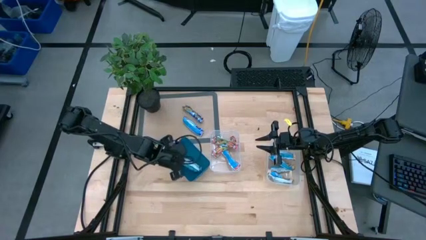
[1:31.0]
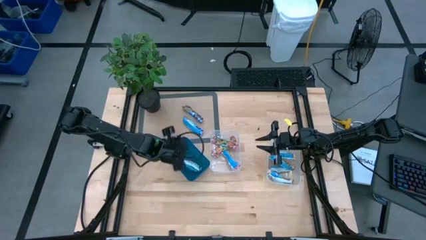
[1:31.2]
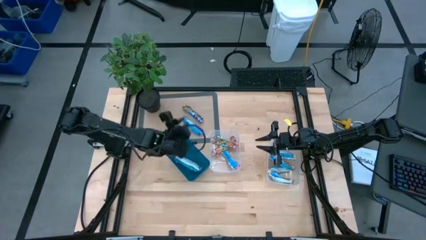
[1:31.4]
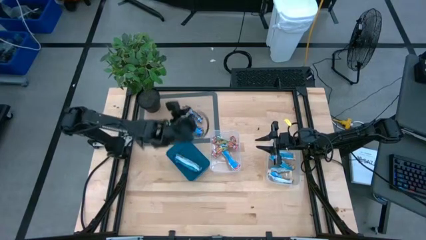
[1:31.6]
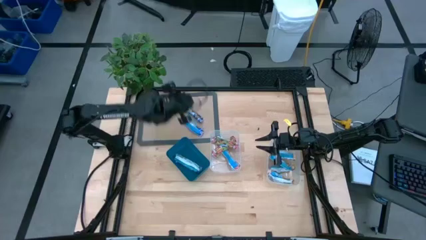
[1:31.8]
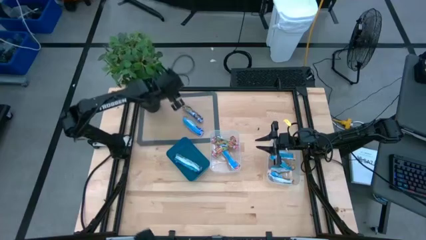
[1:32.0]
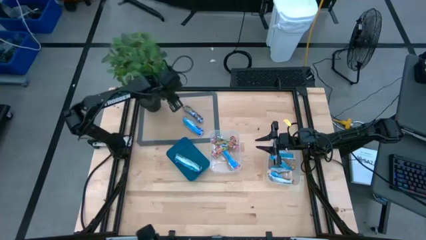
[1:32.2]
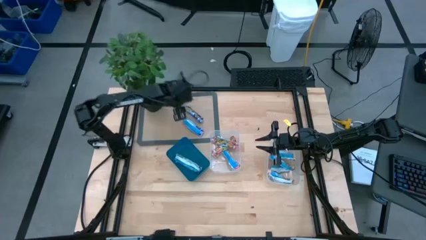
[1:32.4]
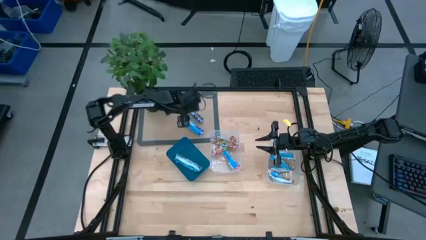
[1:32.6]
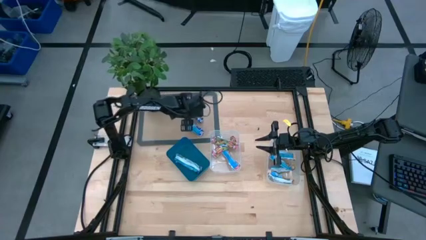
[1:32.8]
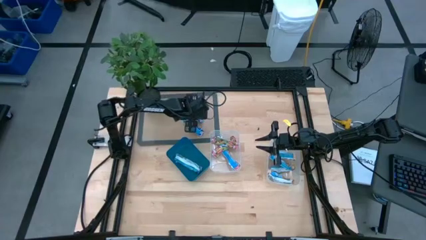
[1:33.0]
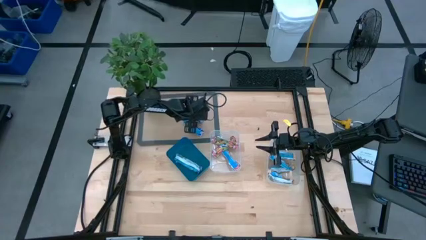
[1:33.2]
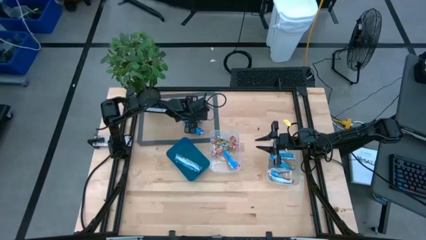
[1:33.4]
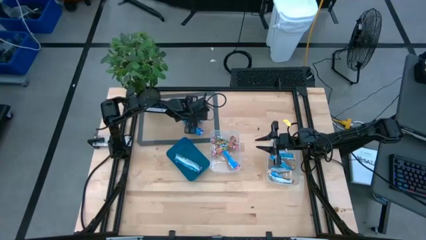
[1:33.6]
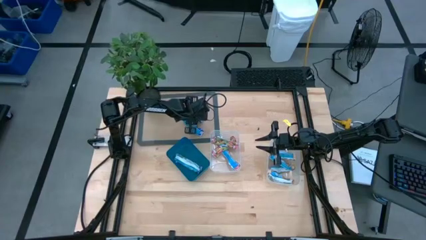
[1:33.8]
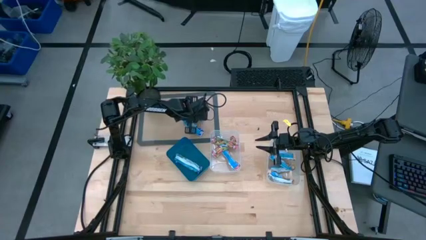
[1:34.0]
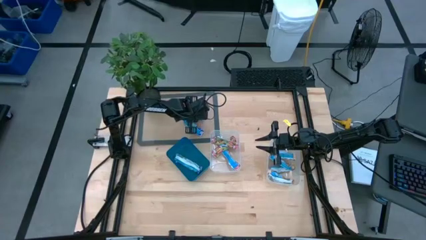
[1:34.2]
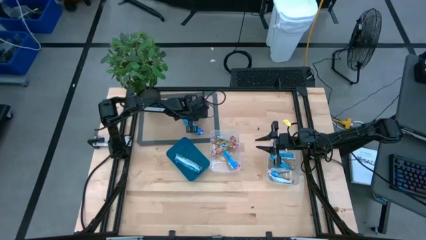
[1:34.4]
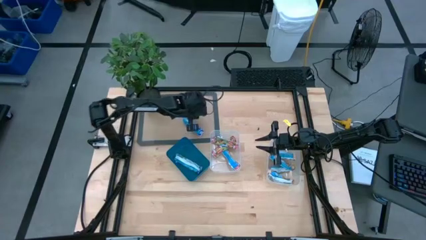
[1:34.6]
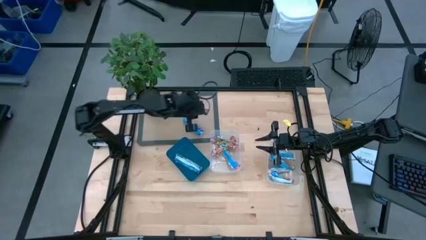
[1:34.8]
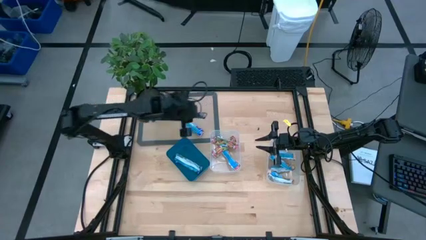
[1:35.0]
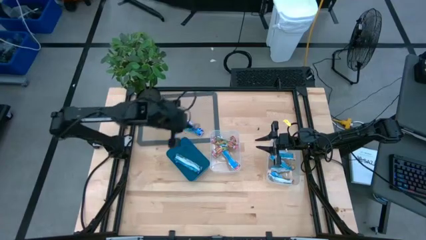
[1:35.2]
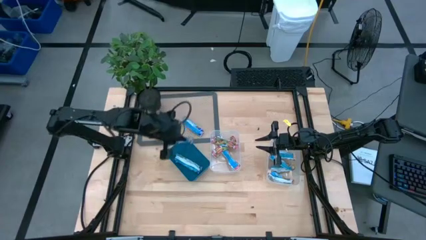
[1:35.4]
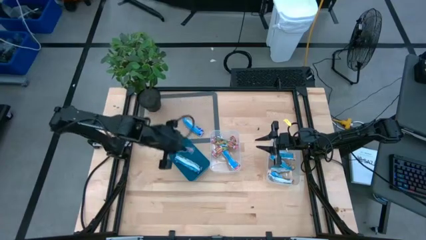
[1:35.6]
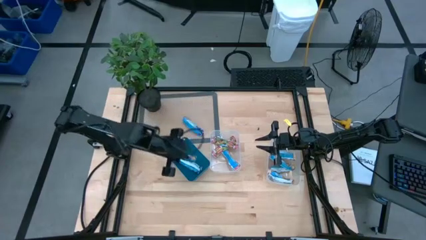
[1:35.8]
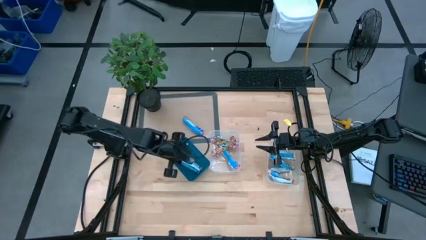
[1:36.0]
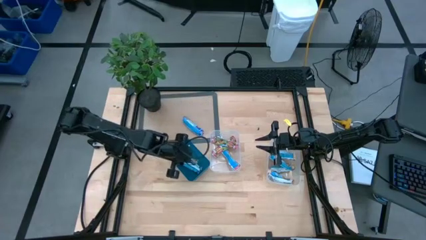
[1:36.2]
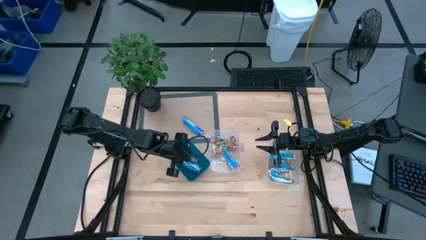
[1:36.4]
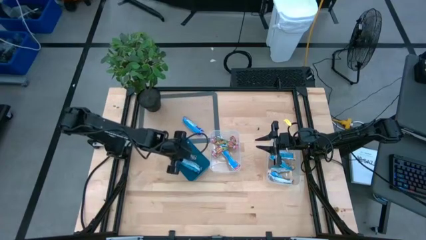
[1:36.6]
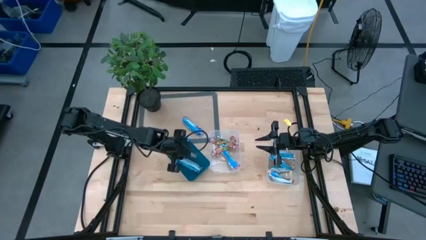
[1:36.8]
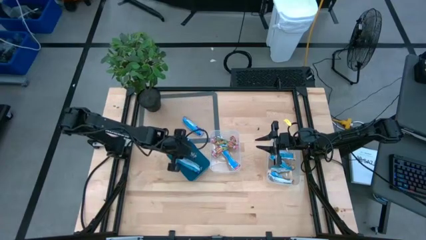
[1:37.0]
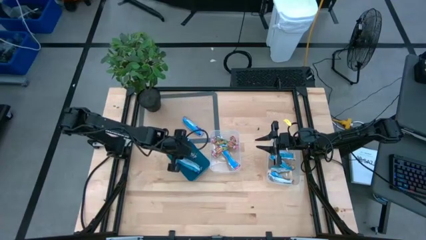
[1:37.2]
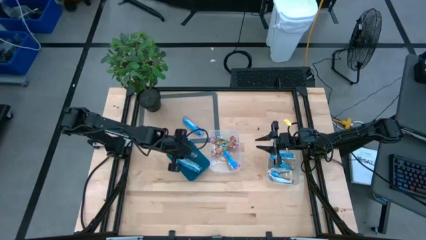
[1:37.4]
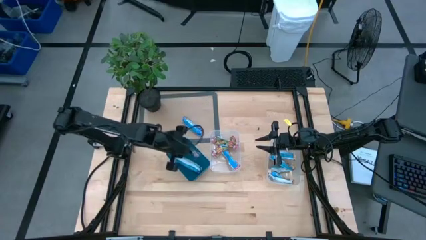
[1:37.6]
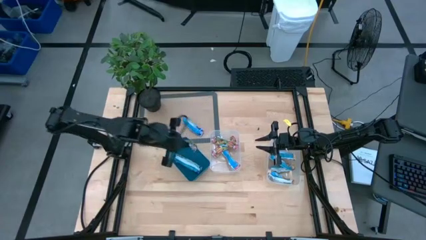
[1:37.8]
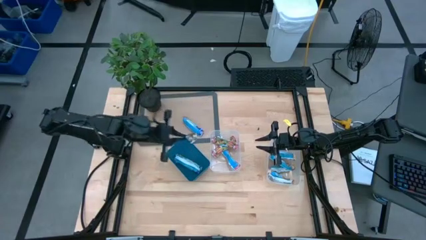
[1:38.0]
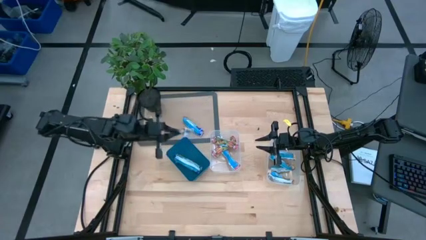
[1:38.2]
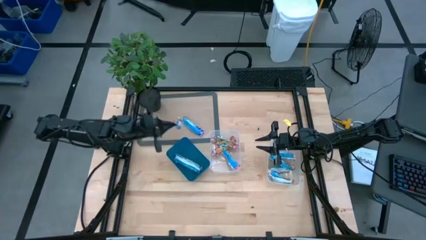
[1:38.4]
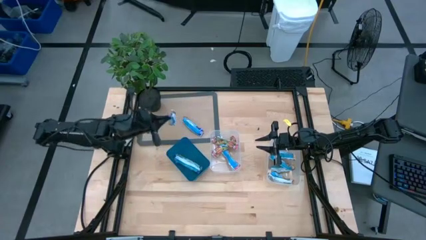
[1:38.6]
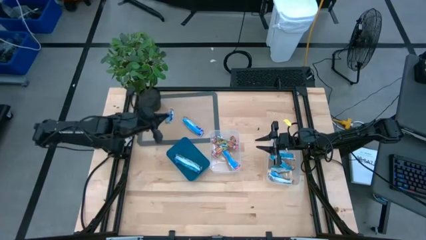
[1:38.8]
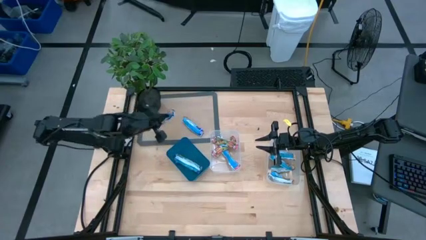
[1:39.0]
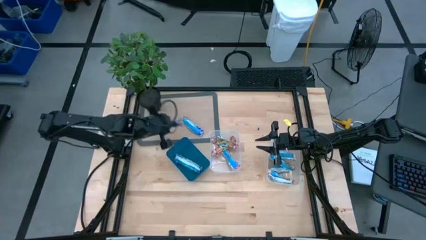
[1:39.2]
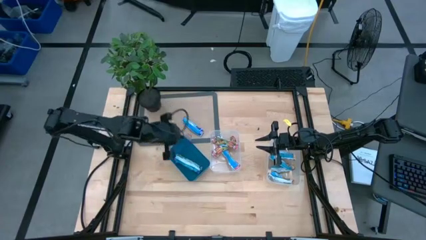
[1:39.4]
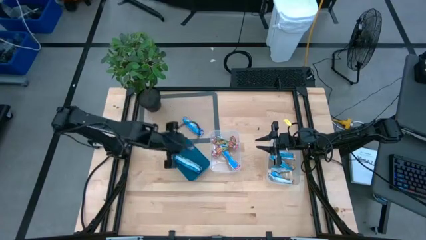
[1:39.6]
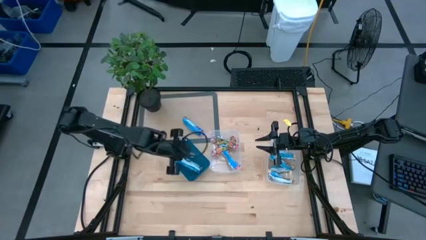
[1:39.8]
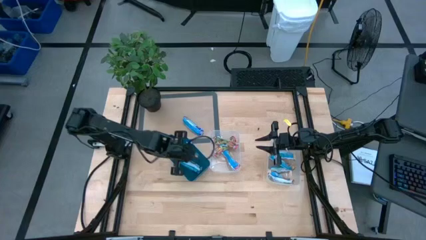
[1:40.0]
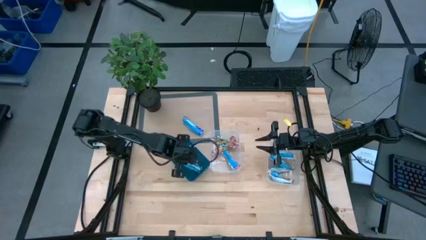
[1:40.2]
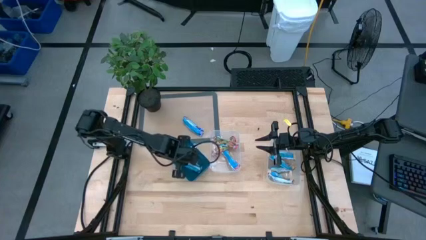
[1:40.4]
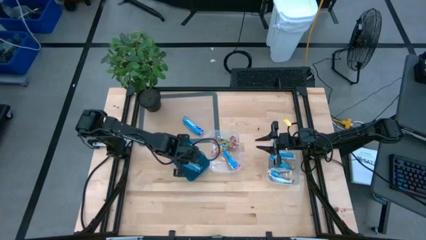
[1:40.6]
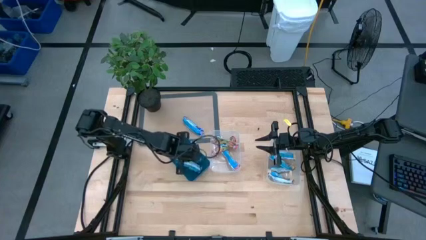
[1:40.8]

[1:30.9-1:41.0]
Task: Pick and place Granola Bars by type
Put the blue granola bar into the blue bin

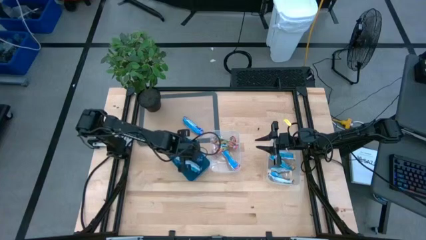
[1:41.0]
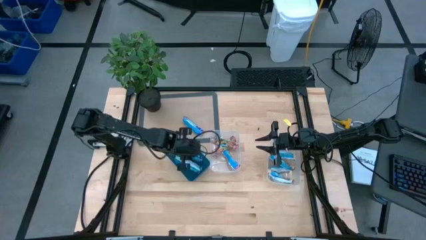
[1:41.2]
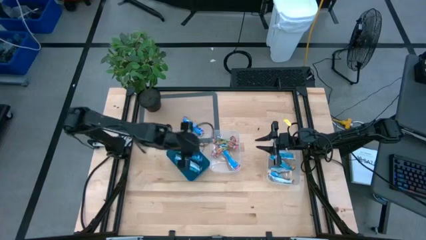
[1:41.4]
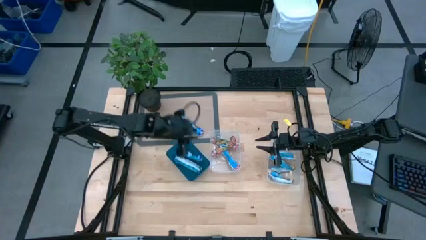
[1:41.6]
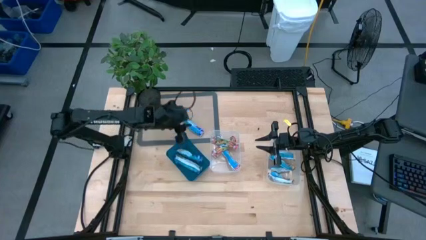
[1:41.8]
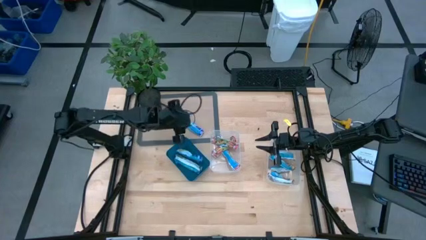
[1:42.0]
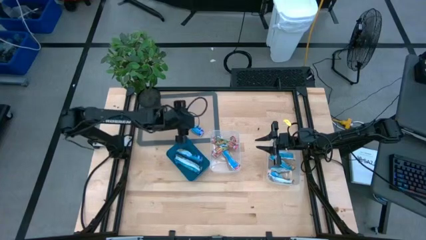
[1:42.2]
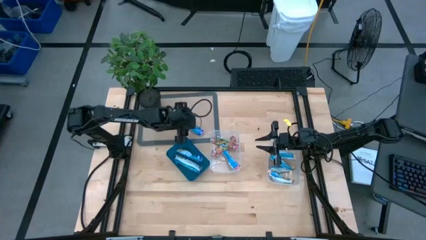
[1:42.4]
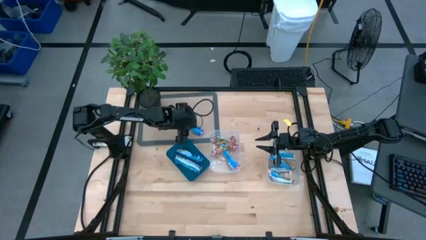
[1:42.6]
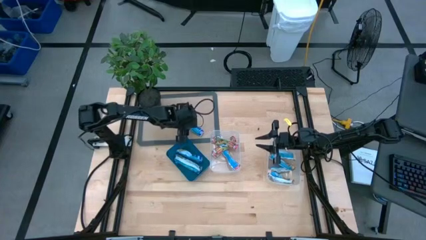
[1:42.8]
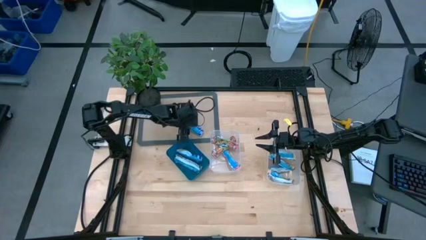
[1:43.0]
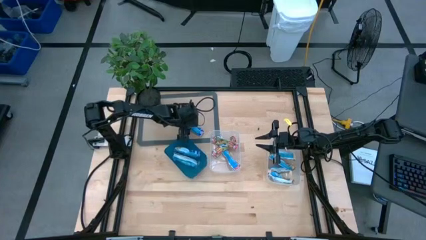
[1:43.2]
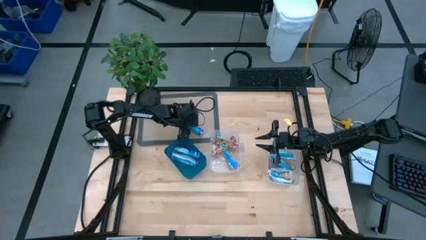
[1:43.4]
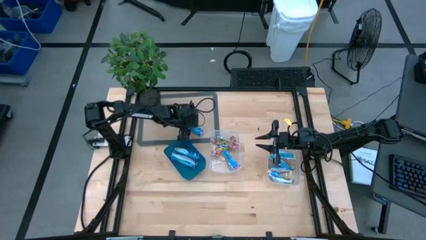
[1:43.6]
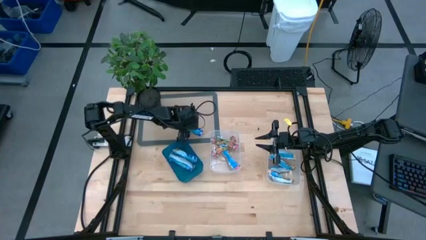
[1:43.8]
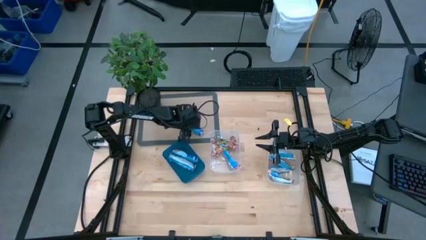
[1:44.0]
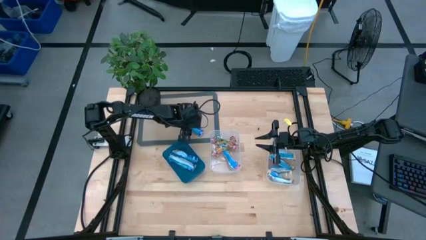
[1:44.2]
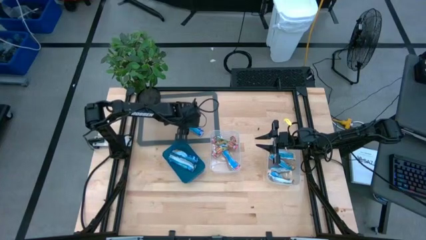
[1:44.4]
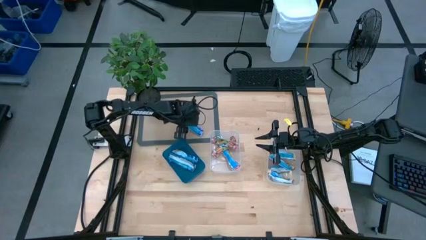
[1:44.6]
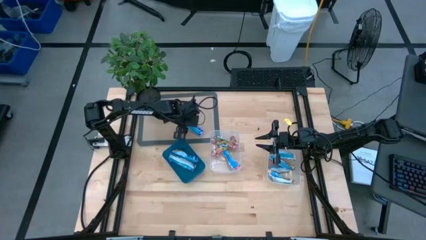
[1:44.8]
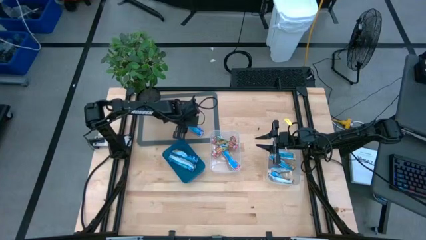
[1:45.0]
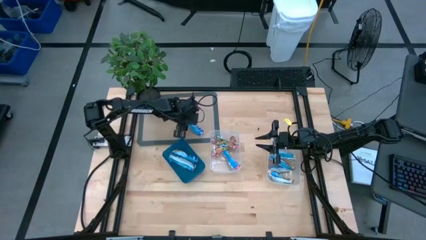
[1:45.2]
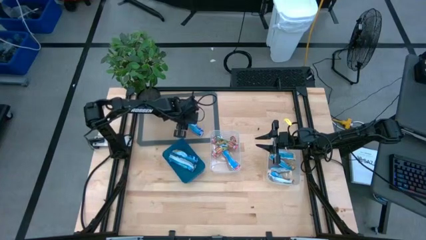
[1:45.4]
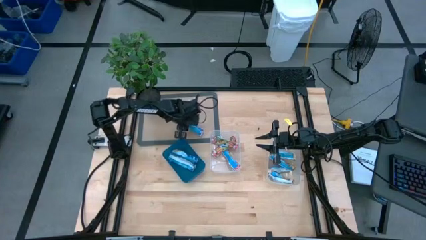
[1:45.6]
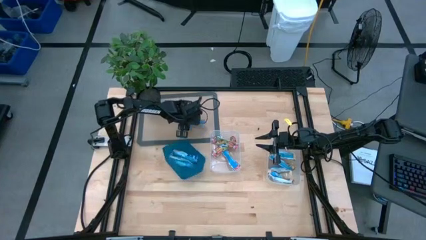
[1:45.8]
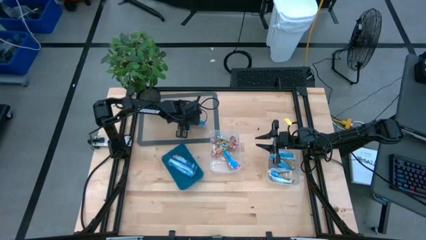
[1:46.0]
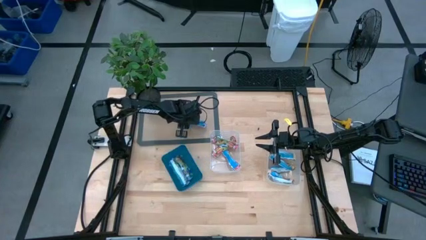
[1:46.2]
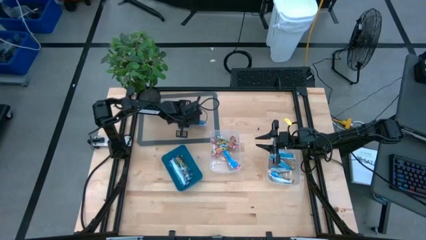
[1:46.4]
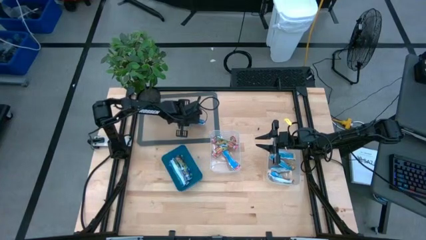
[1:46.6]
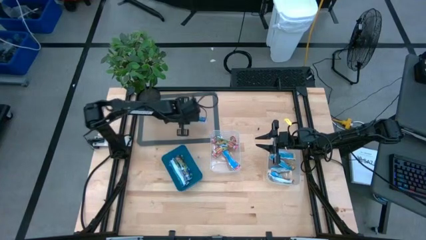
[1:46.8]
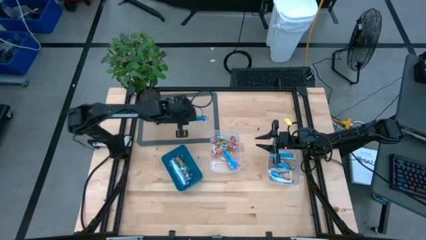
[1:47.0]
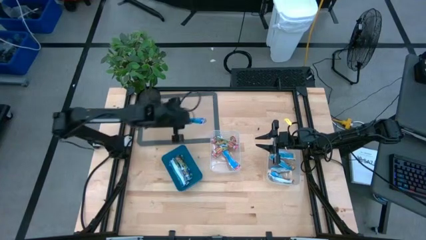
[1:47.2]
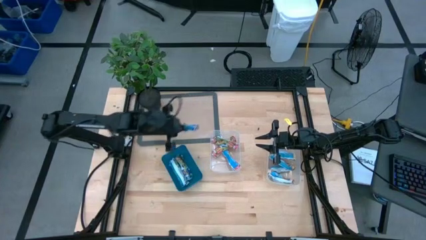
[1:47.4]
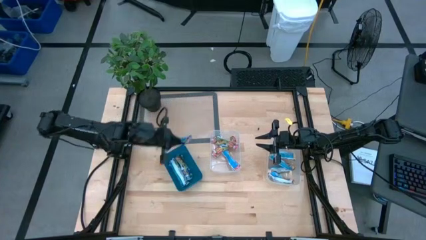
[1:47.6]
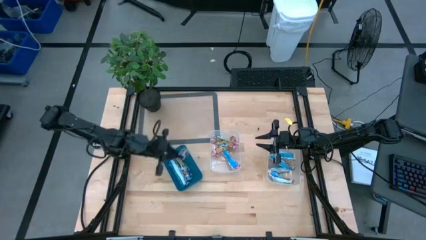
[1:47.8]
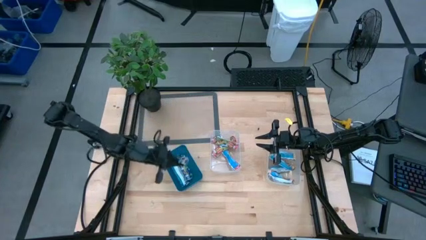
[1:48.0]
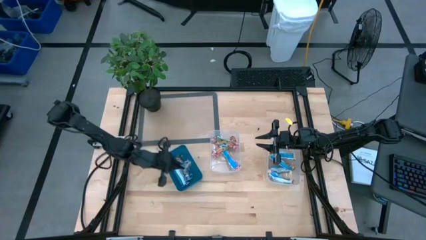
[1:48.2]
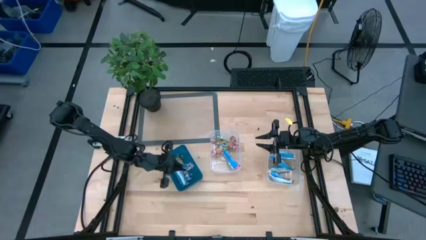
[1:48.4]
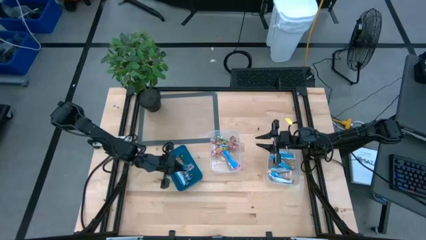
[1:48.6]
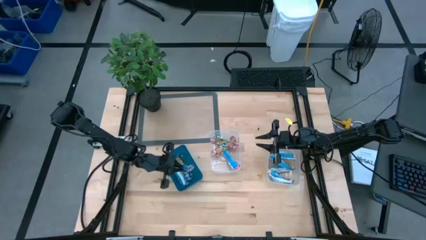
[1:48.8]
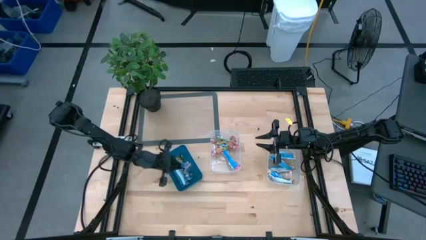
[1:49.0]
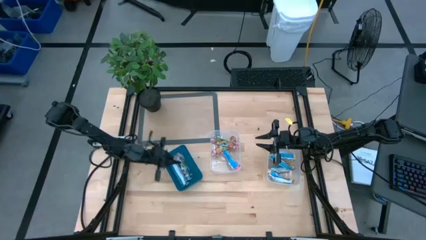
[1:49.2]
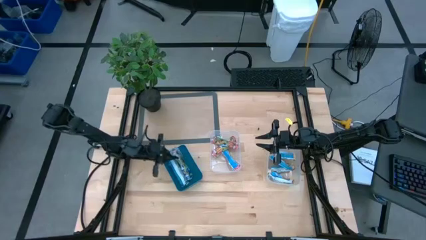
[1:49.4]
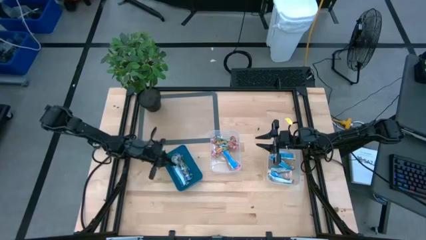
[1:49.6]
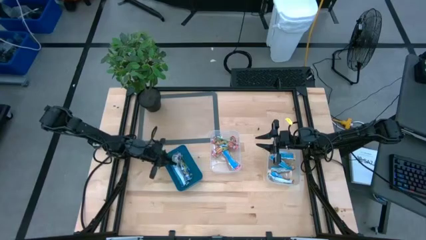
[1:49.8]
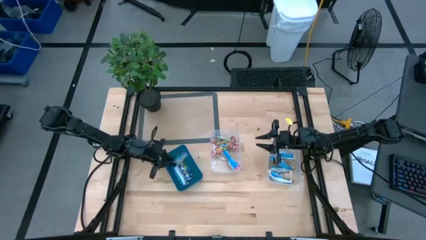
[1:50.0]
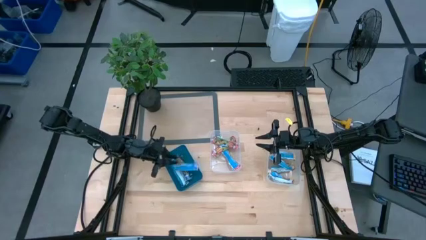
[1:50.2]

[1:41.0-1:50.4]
Put the blue granola bar into the blue bin
